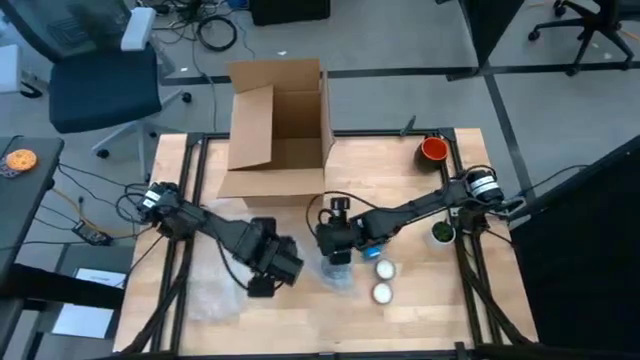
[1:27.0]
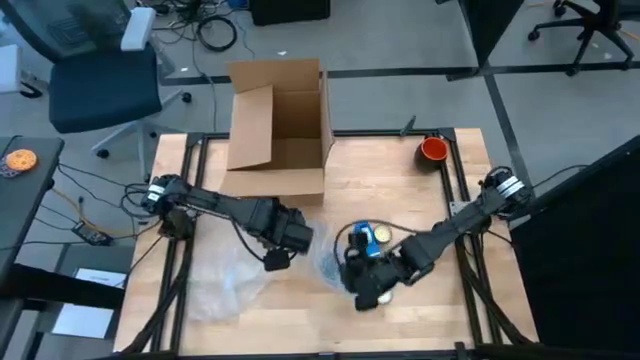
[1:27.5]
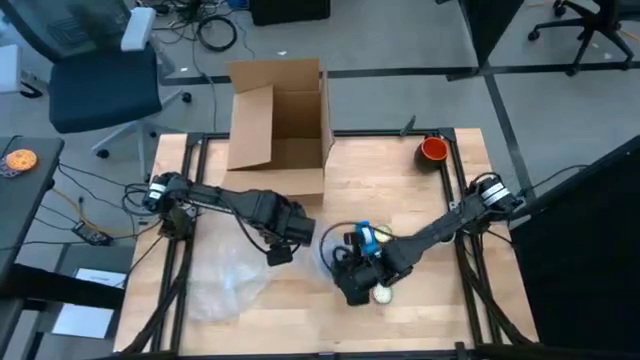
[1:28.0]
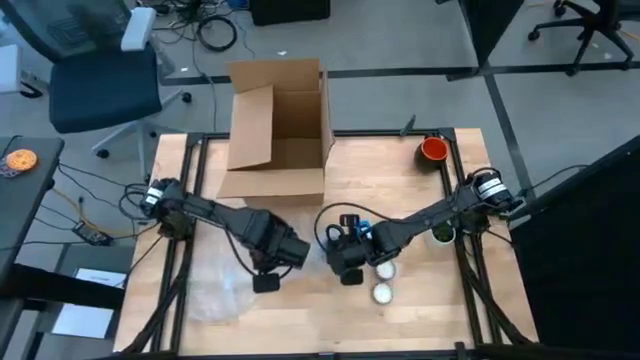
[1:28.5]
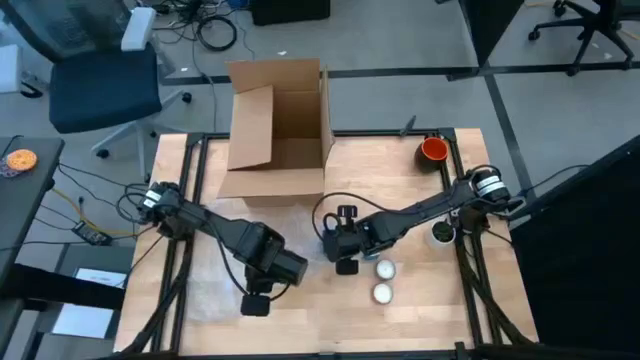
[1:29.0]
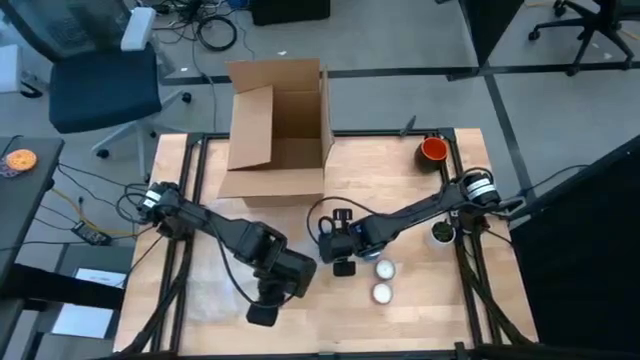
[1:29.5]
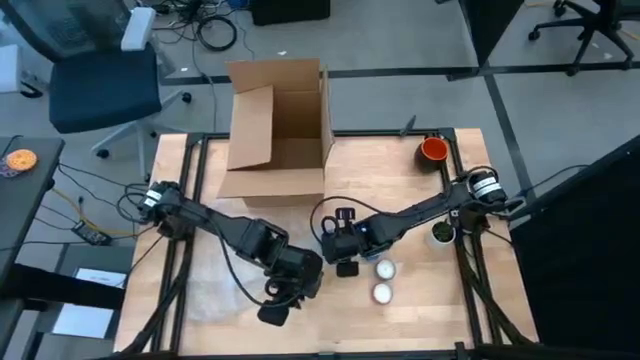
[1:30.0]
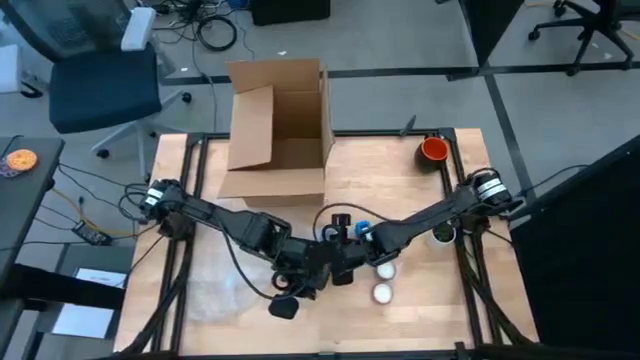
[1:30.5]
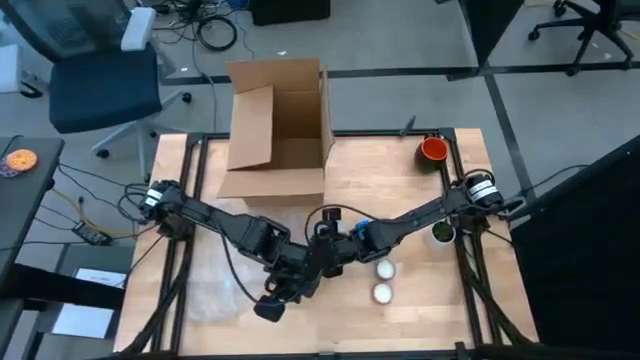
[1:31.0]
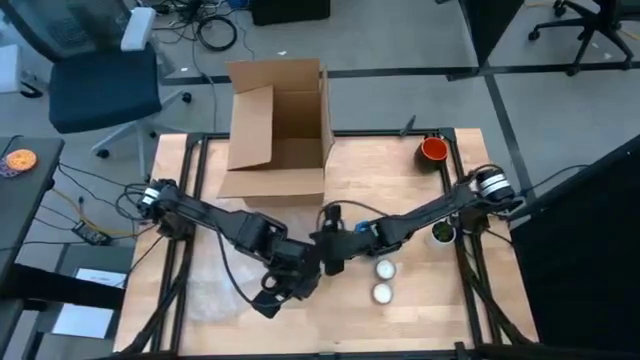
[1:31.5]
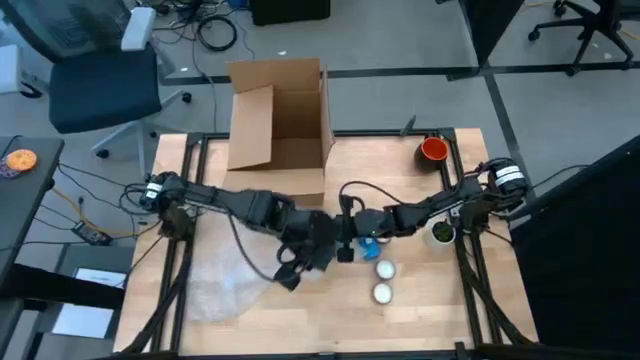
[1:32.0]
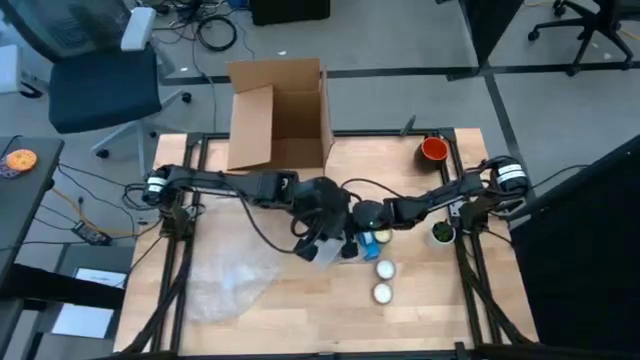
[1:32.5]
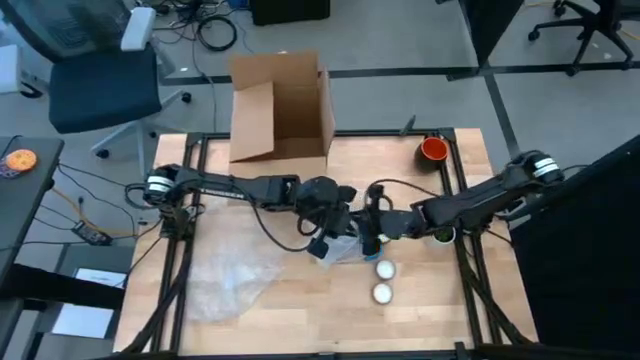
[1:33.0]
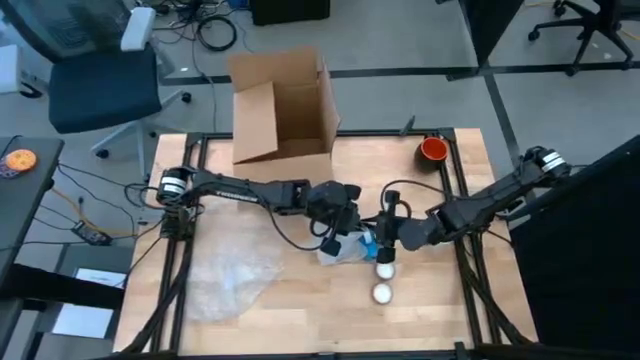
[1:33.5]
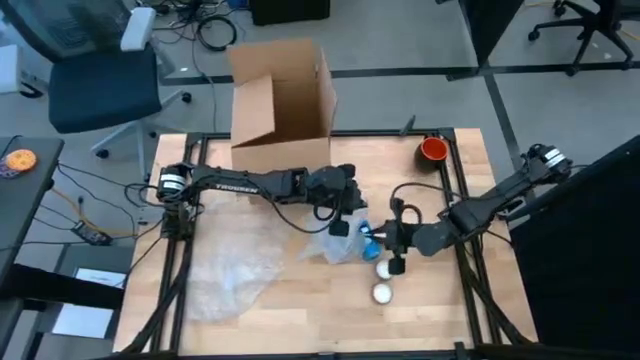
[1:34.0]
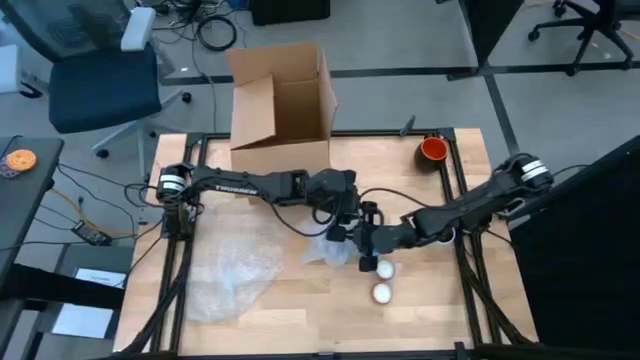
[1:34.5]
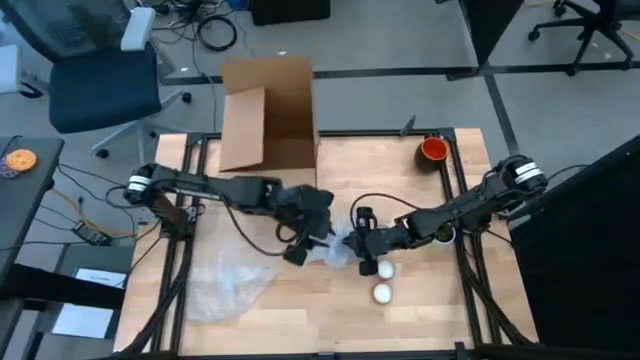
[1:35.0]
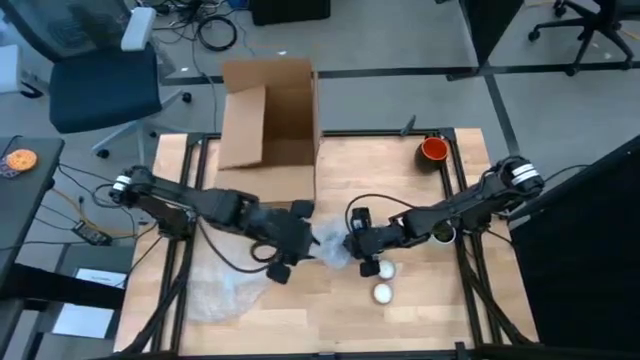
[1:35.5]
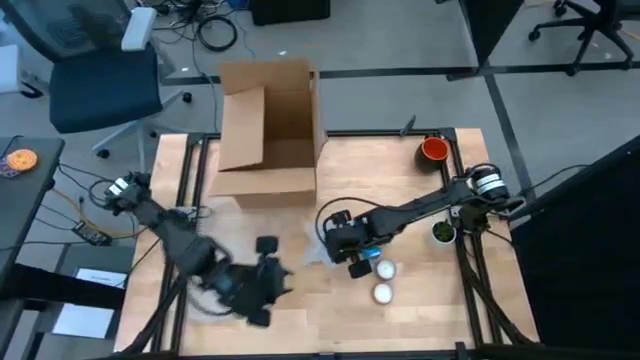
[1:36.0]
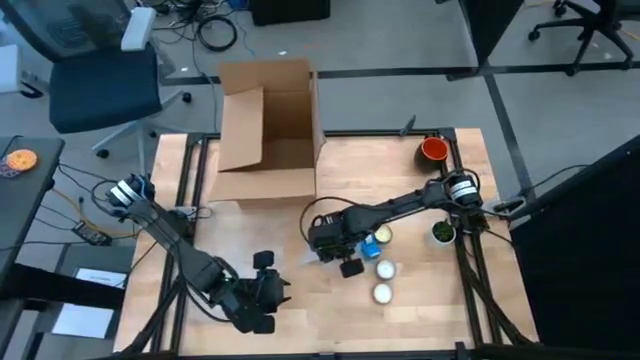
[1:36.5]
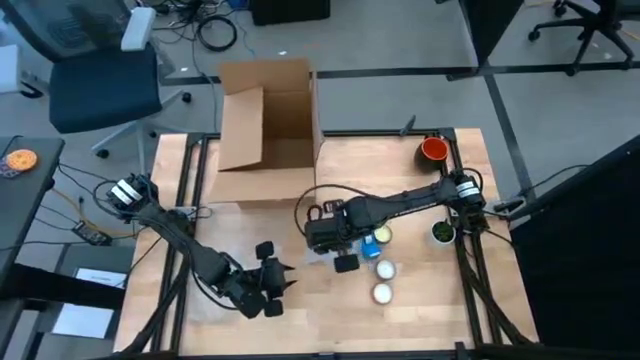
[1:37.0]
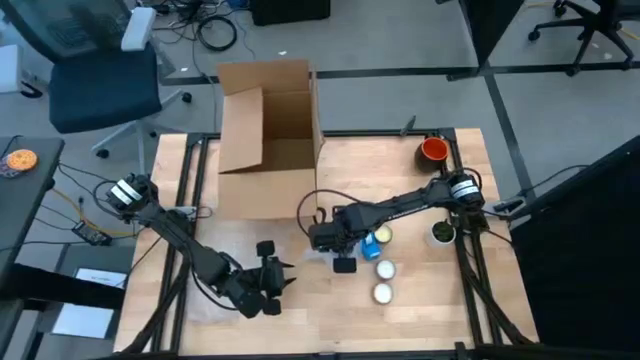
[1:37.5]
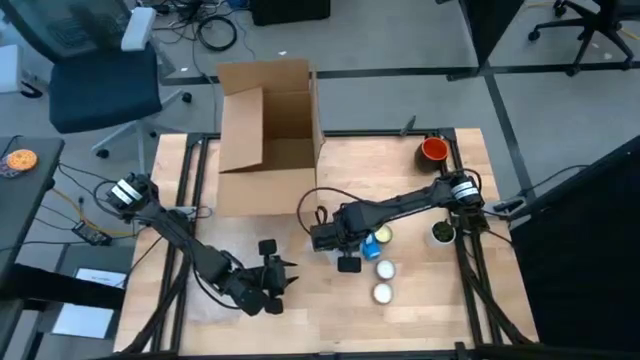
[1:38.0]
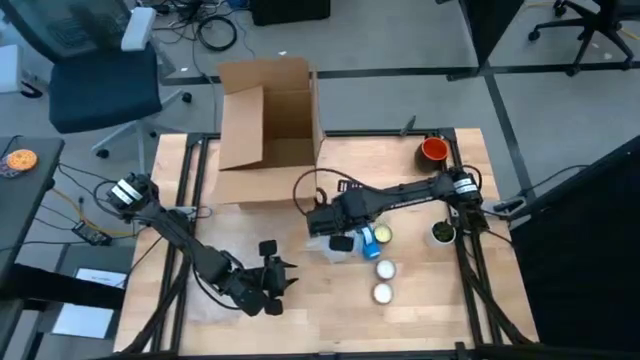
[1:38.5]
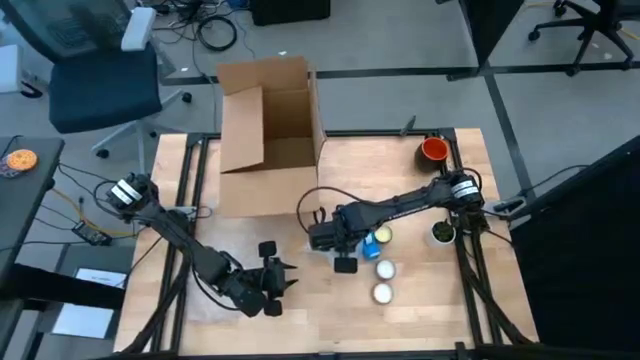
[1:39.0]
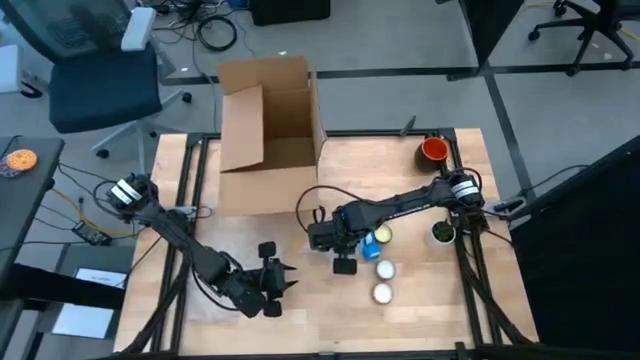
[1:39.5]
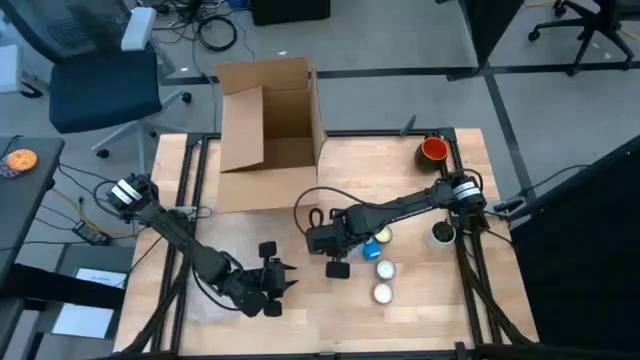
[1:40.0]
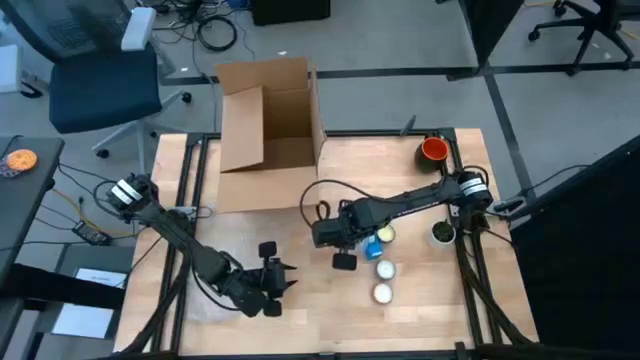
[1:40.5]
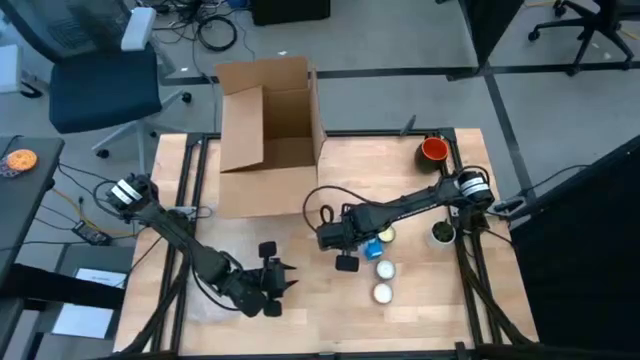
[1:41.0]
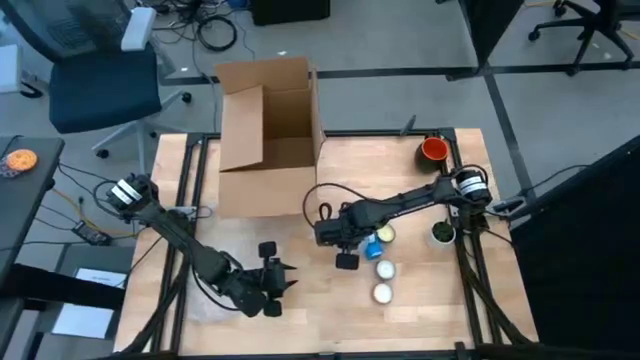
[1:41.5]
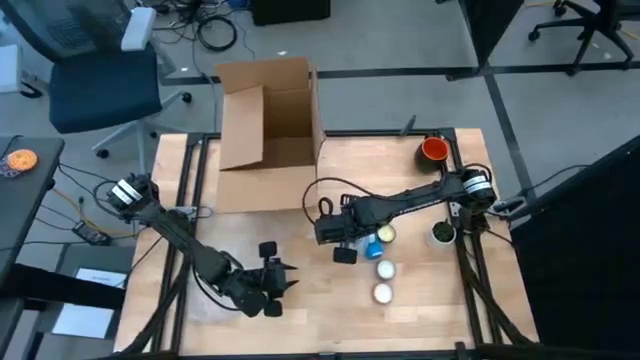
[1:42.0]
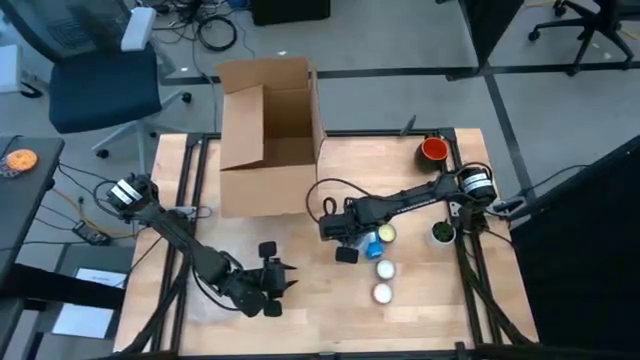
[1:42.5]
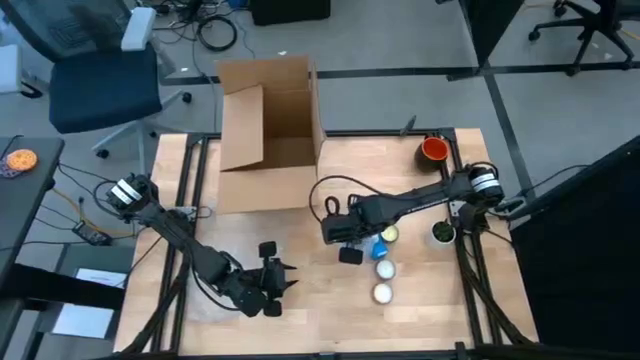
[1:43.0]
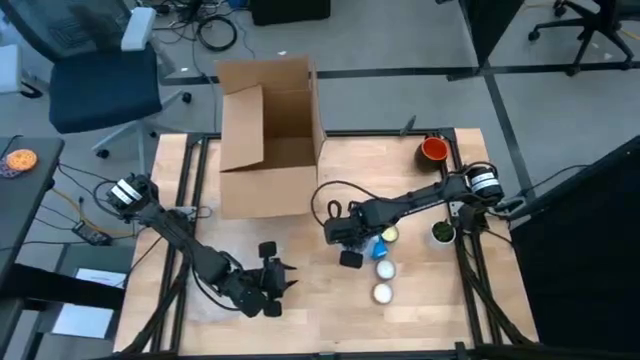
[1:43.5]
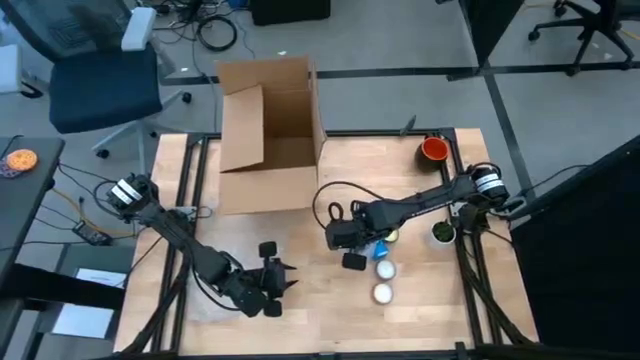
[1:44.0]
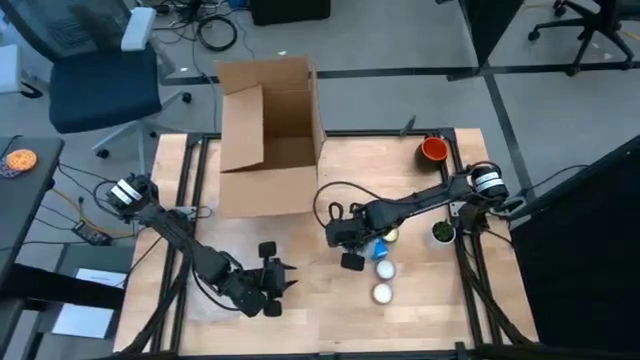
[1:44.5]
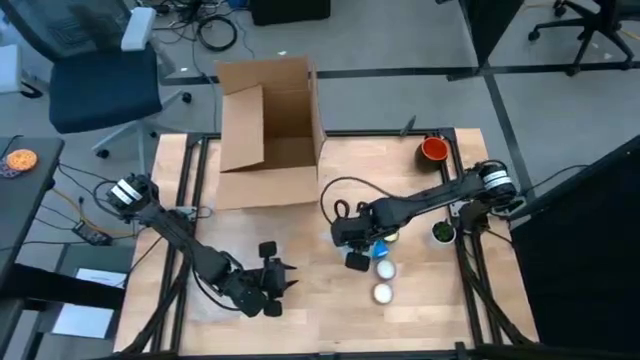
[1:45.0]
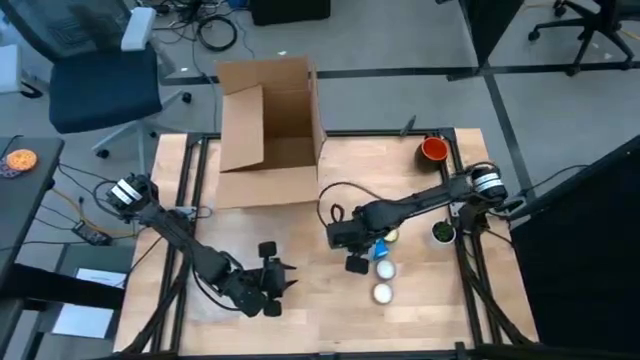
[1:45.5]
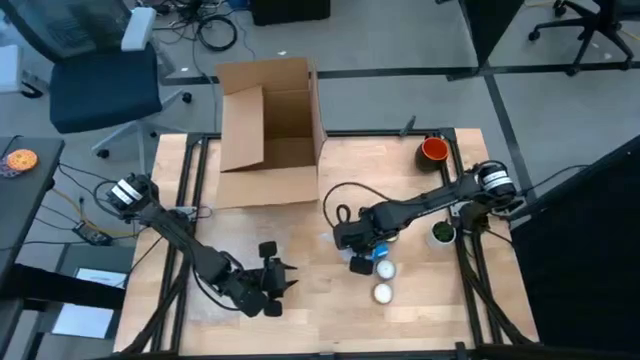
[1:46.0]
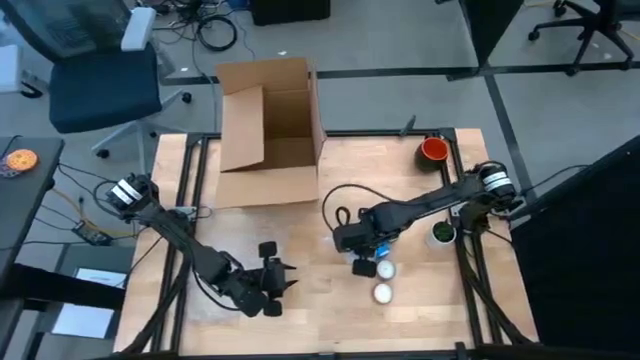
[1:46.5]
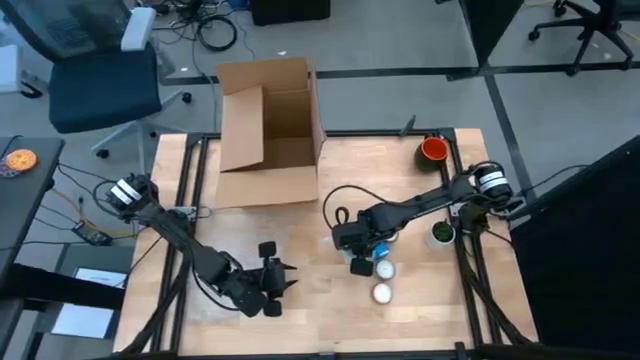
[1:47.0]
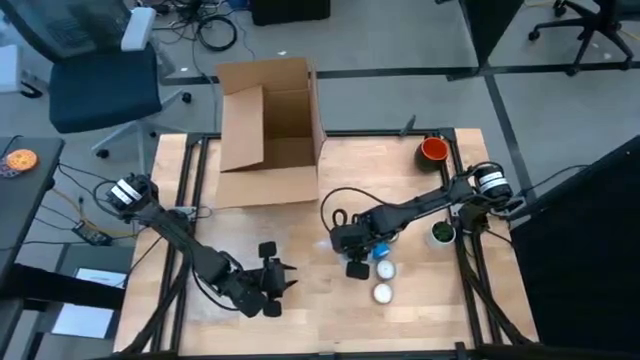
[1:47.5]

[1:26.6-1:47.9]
Task: wrap mug
Wrap the blue mug with the bubble wrap
